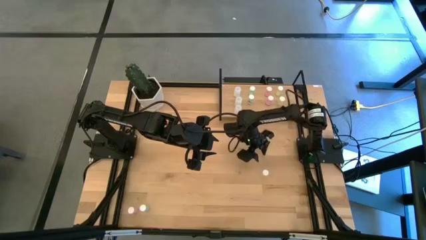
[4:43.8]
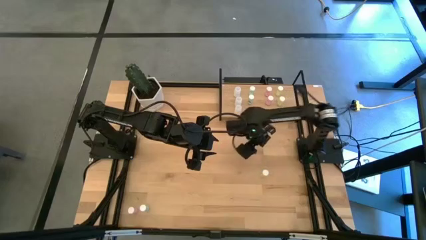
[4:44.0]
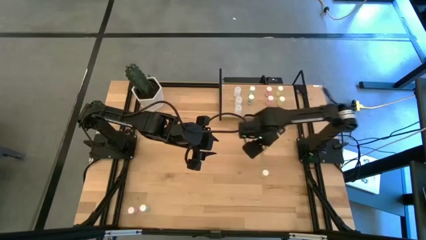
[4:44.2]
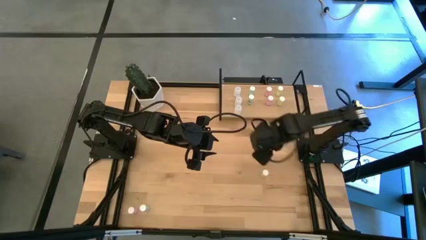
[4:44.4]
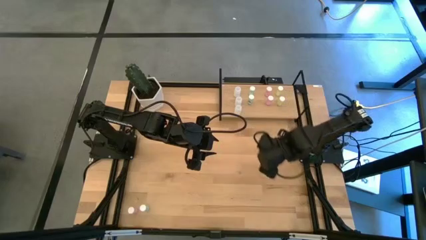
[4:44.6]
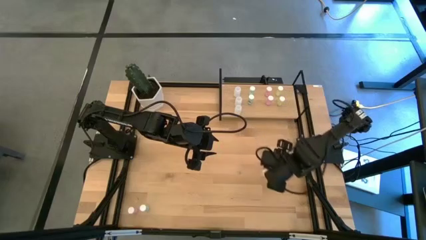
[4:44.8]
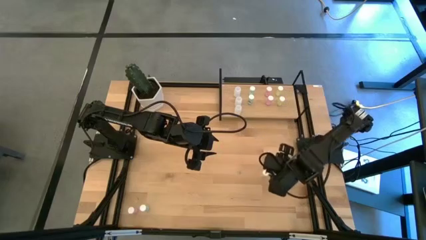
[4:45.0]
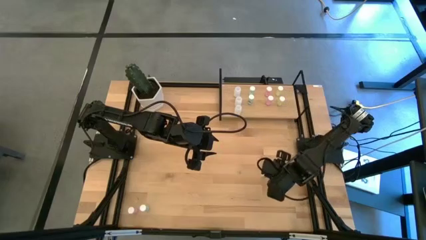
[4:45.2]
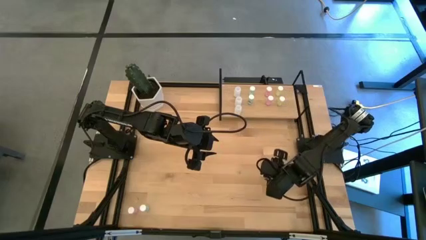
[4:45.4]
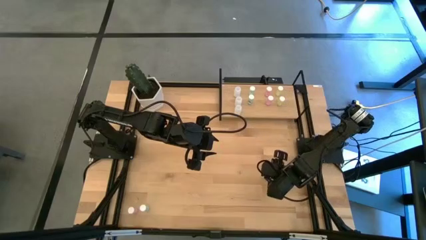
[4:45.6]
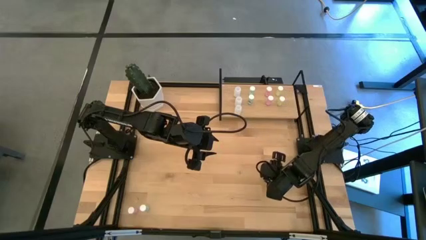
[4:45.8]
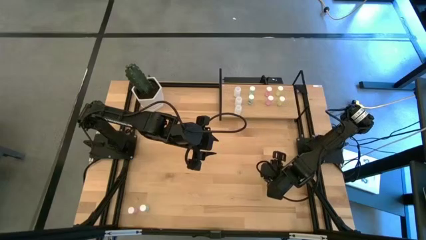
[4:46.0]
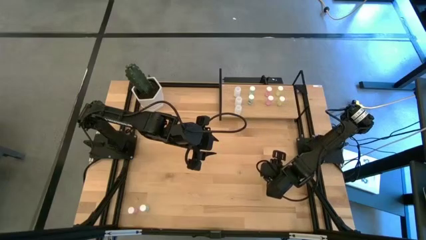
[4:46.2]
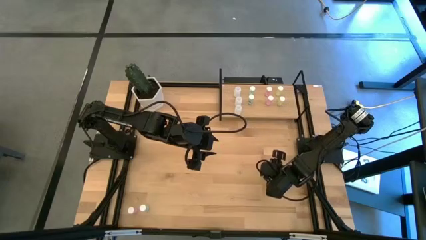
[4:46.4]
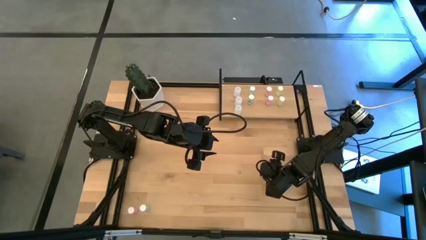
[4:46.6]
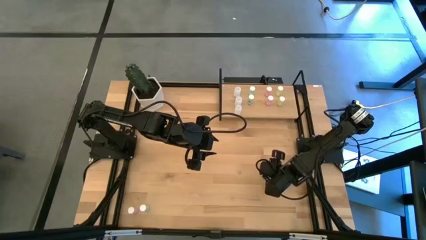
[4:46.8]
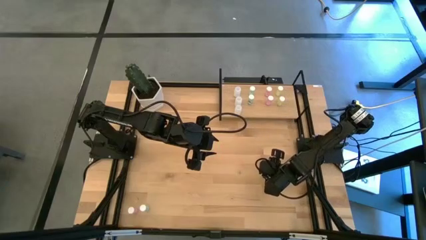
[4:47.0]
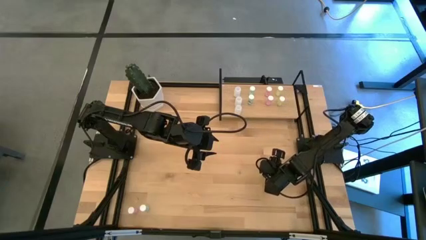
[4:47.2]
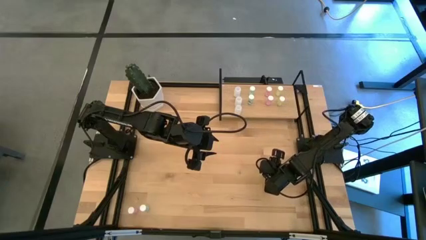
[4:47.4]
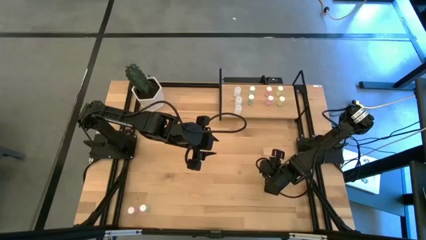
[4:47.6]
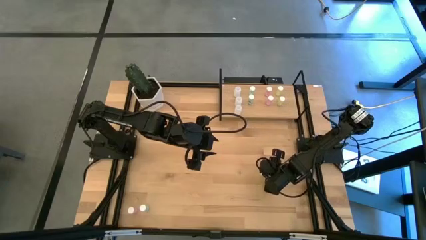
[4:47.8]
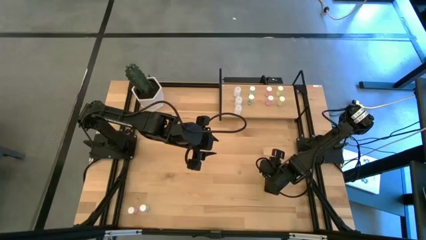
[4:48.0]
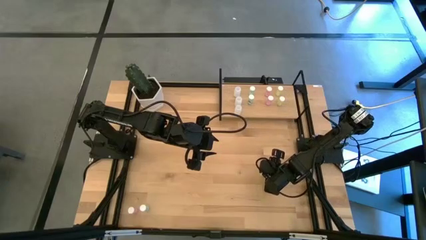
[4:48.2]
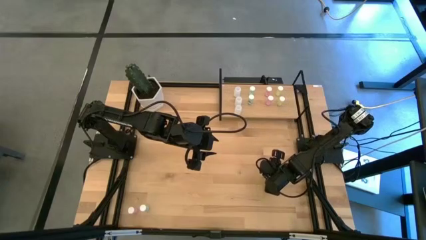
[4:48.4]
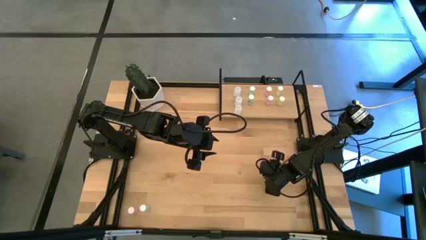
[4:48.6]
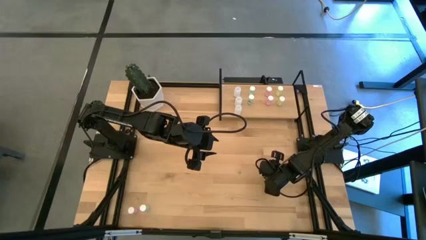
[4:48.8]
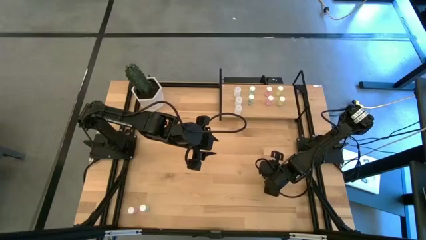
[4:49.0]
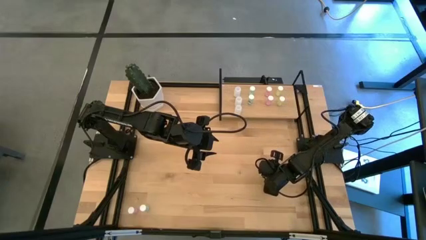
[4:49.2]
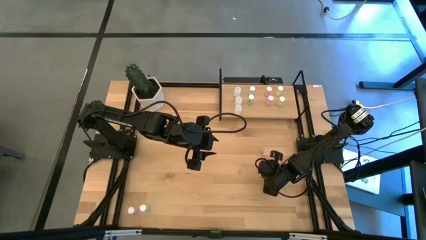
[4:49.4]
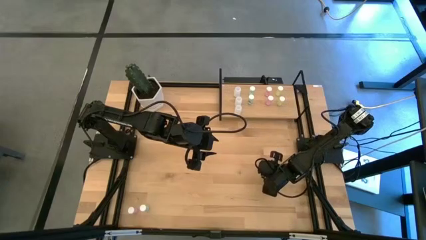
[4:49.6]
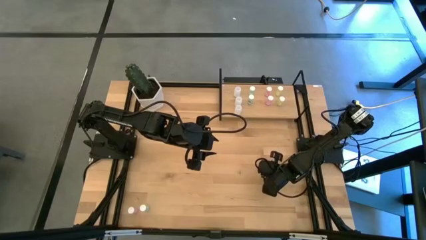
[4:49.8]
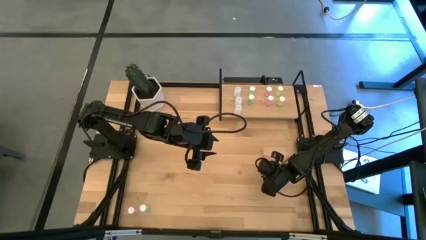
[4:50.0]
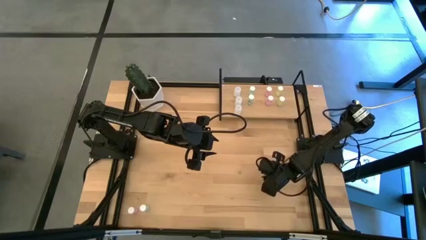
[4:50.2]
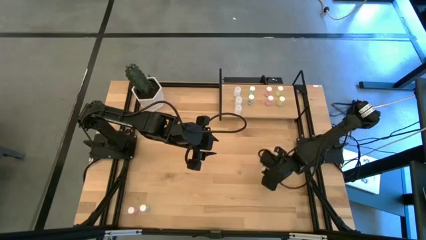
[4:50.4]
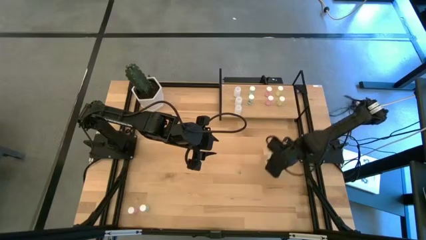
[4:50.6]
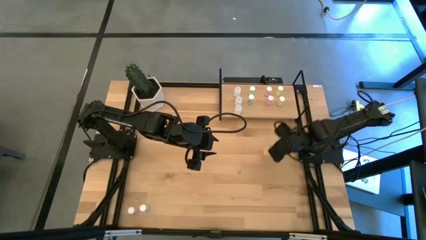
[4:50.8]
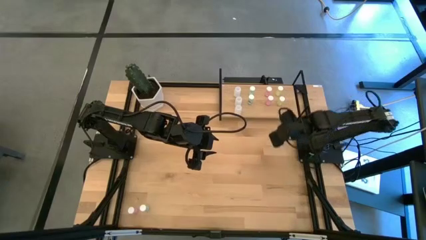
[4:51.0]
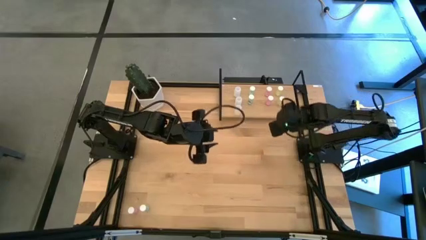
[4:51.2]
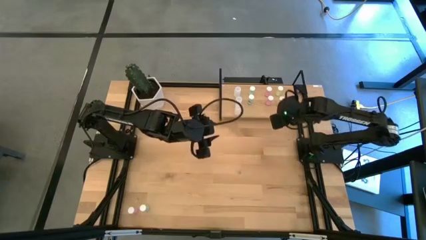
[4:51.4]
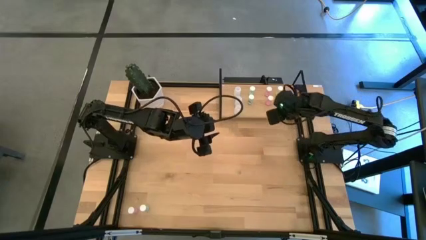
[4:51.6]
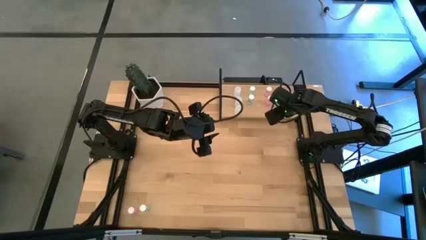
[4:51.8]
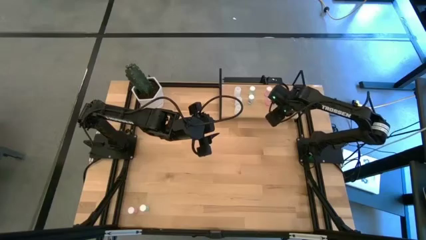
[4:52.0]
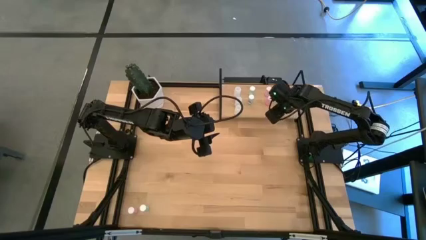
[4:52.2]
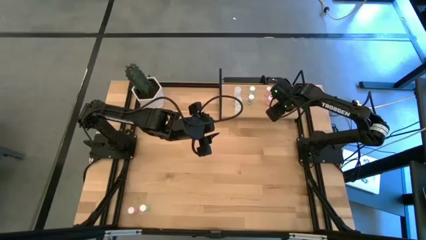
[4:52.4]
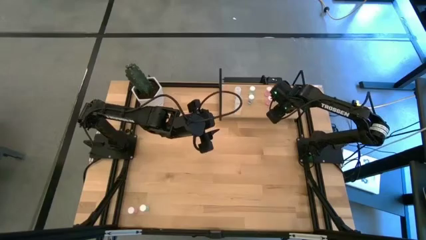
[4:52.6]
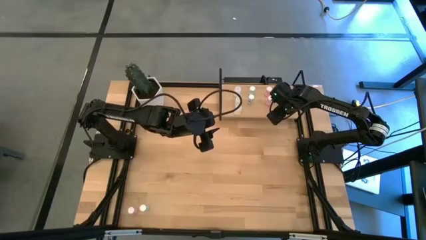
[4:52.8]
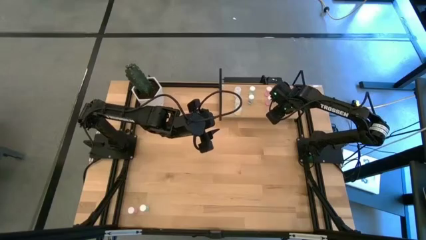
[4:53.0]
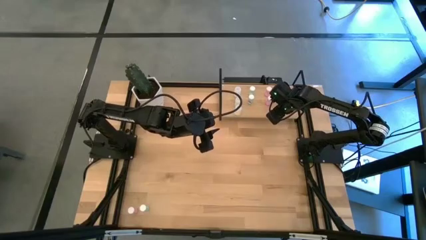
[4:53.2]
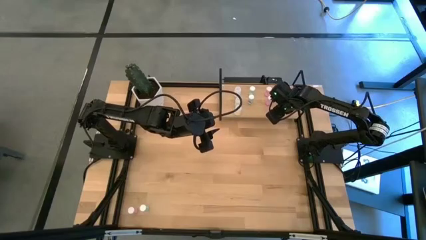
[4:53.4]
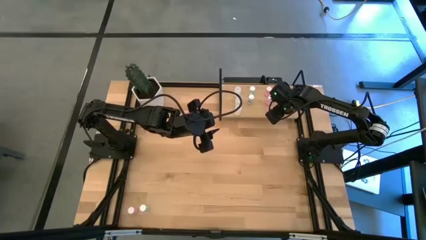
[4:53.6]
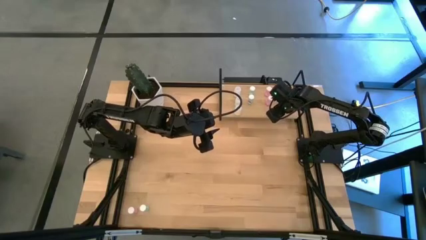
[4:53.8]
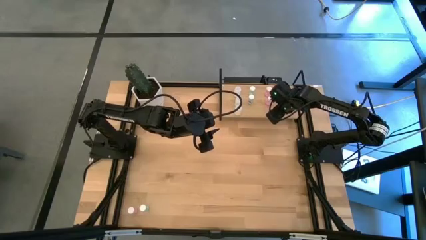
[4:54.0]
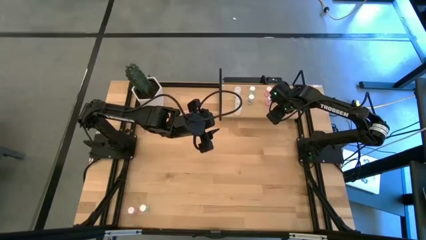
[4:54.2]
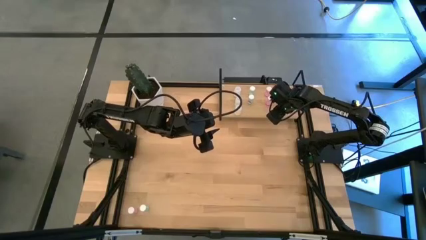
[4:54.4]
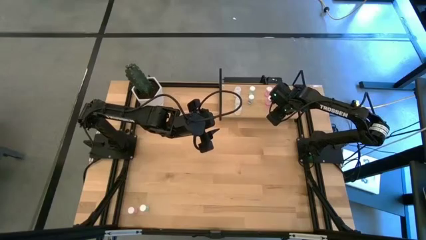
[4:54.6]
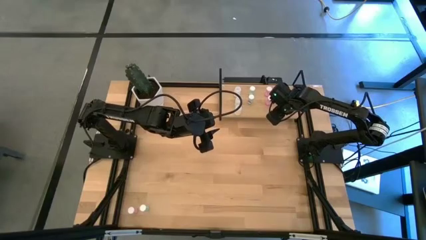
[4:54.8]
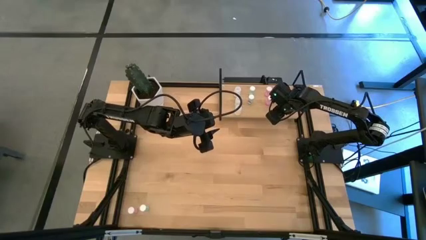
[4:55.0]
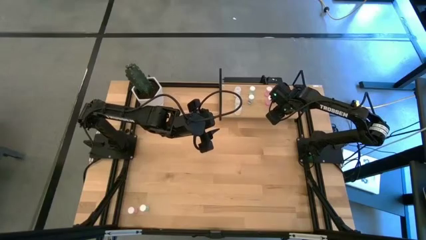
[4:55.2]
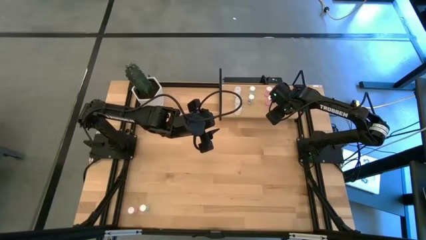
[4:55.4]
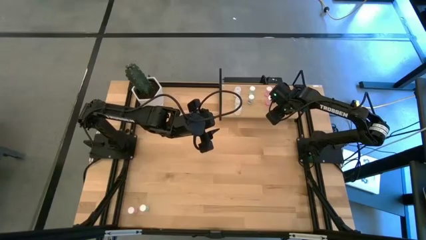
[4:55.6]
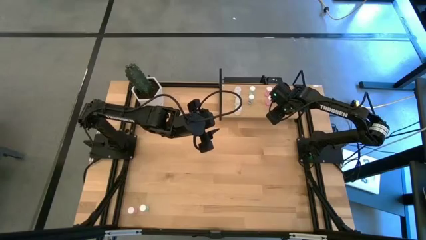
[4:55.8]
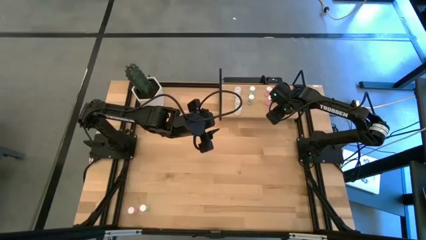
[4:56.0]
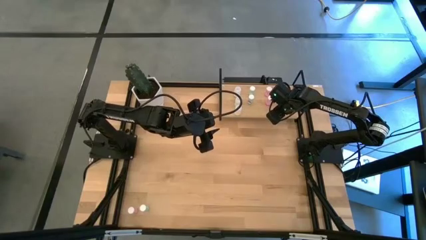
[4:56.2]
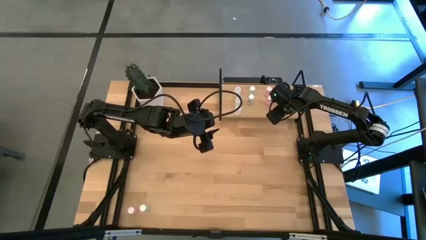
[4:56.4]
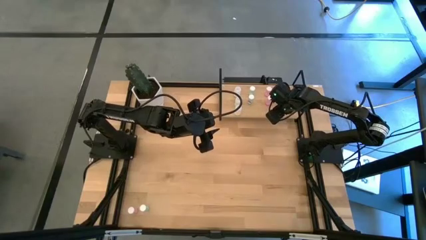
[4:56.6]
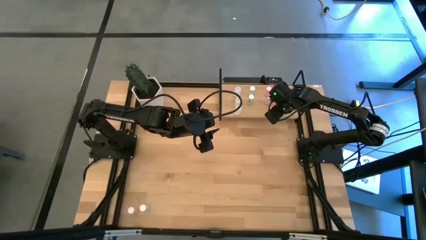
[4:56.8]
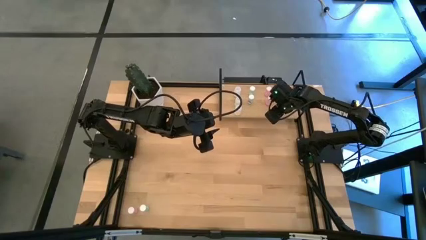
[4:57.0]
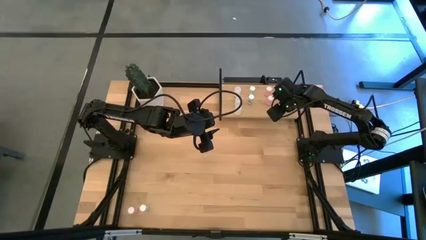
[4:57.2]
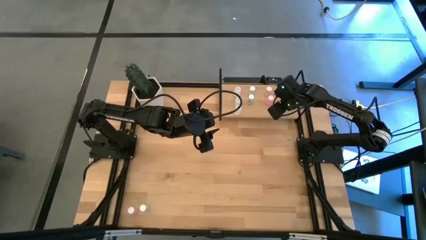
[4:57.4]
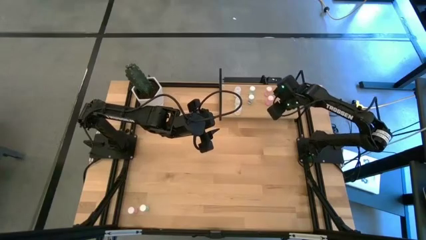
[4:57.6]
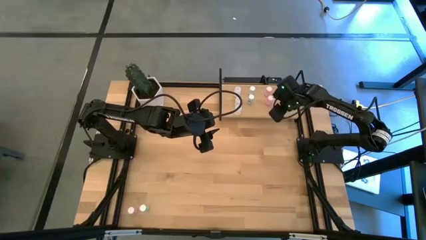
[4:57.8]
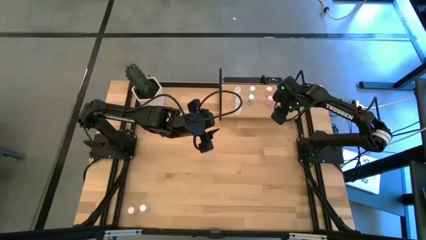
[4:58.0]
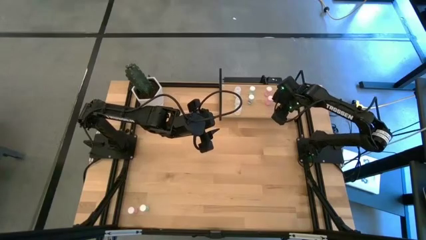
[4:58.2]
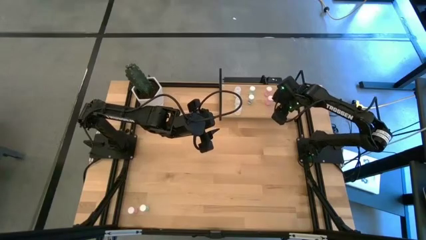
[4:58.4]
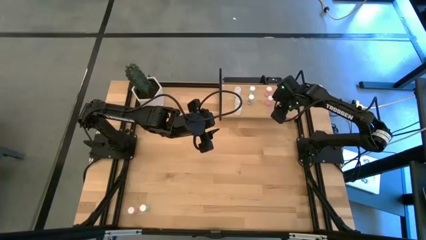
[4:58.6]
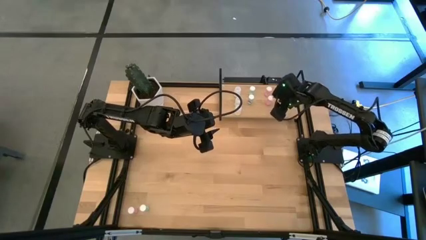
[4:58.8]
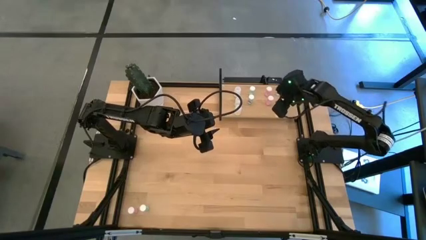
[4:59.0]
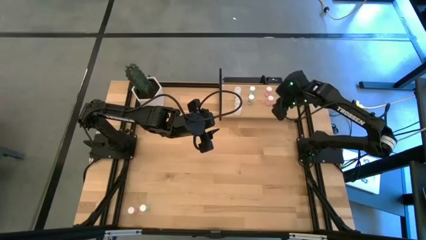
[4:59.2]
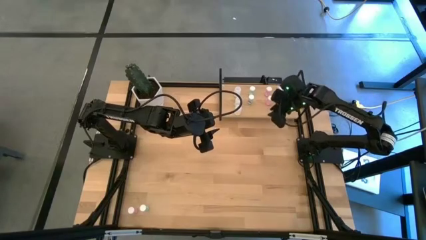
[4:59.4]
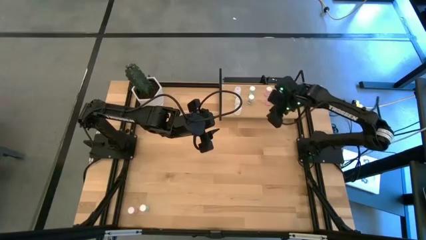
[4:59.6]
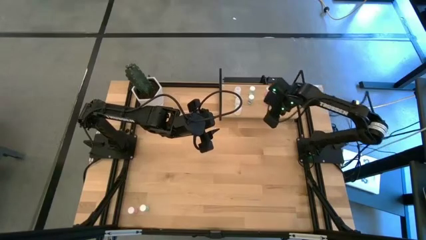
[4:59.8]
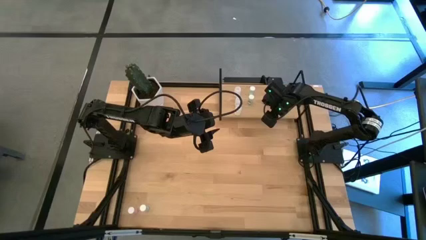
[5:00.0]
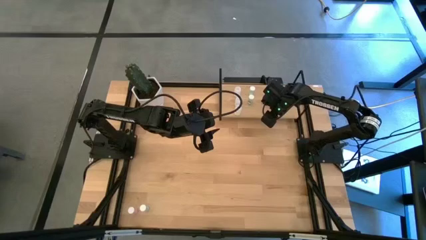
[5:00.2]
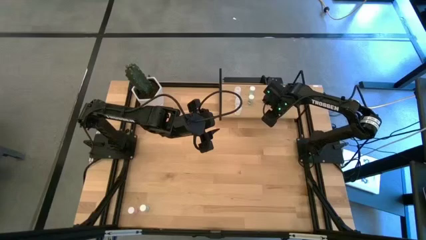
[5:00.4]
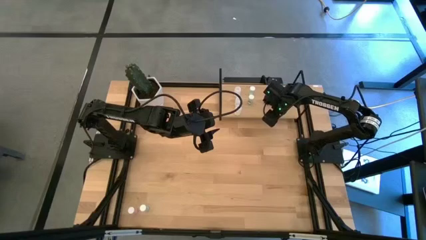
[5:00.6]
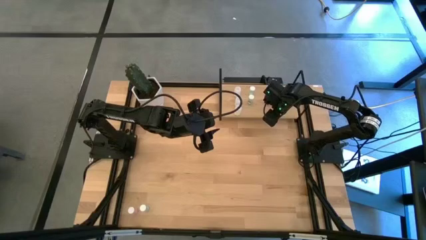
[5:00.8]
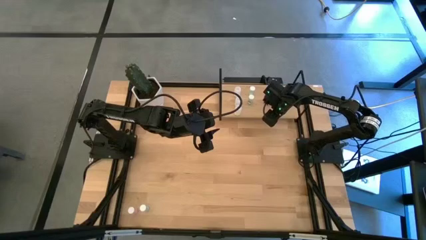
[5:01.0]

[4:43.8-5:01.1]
Task: Pick and place medicine bottles onto shelf by color
Put the yellow pill bottle on the shelf aligned with the other yellow pill bottles
